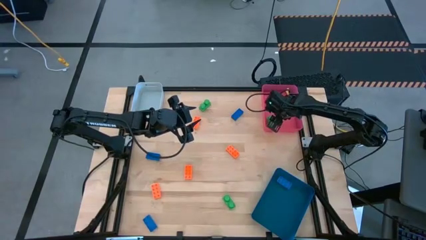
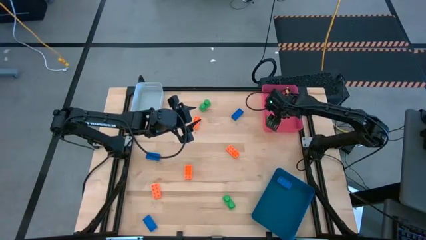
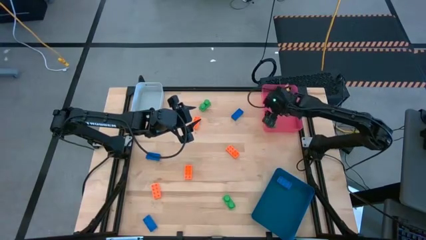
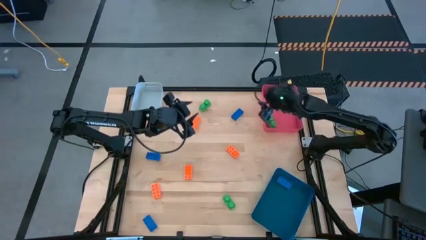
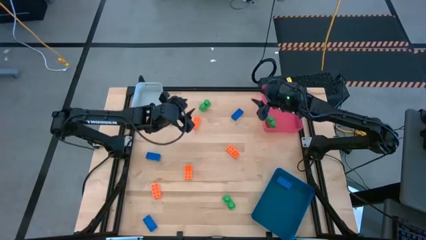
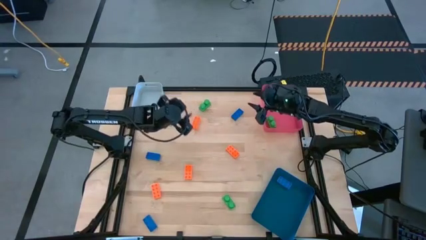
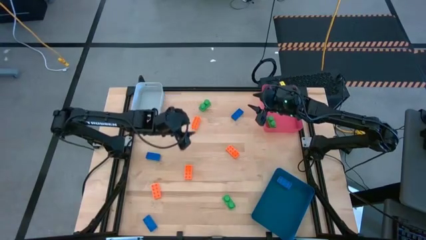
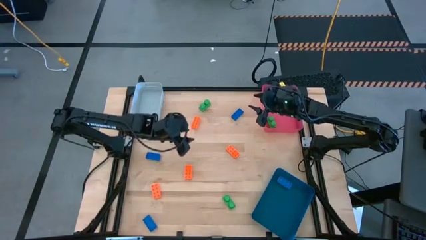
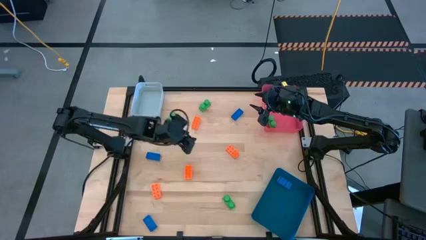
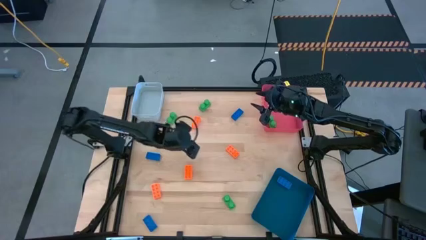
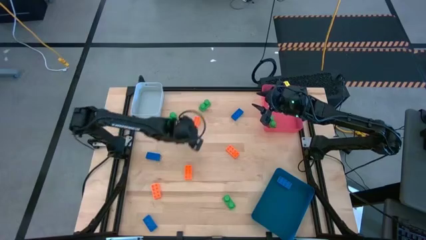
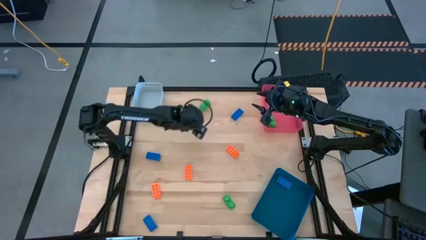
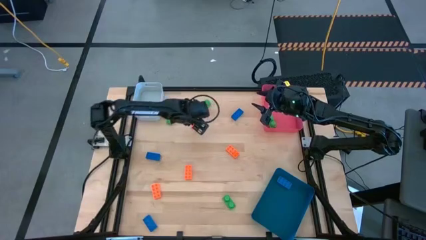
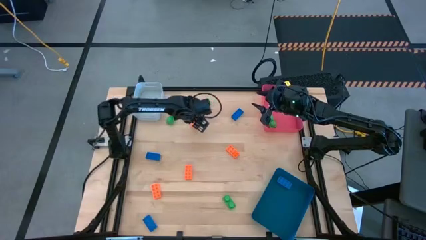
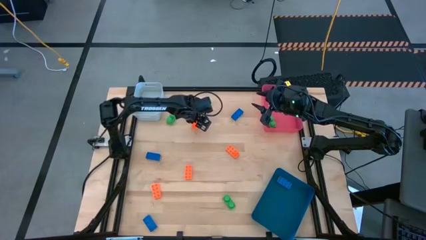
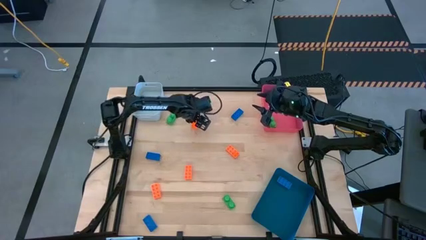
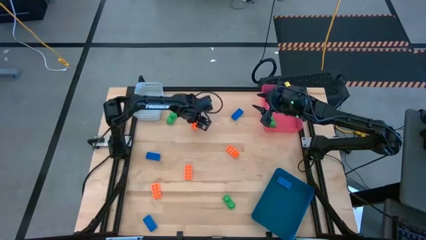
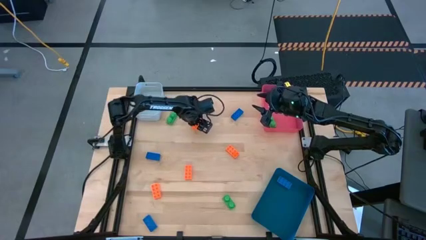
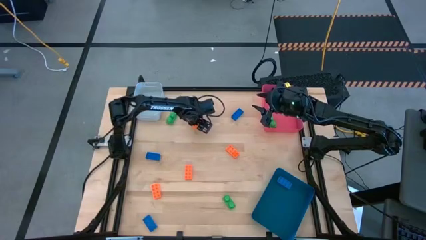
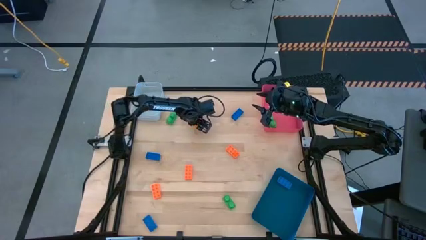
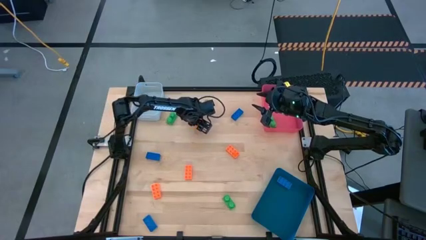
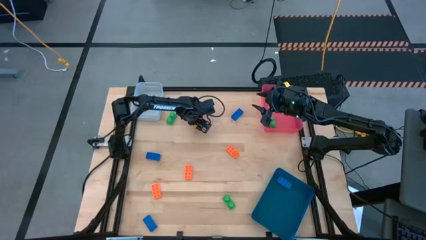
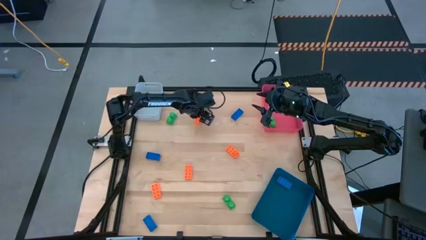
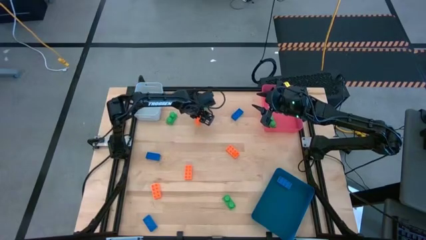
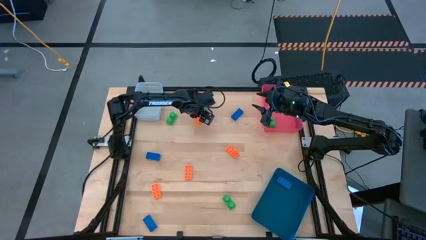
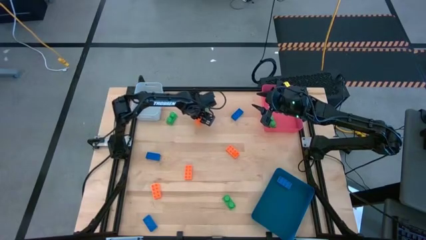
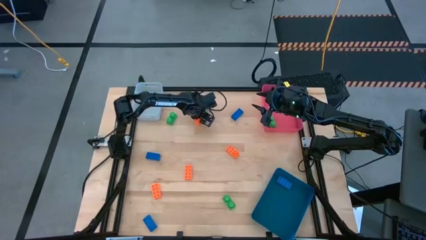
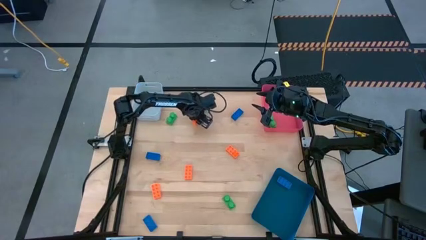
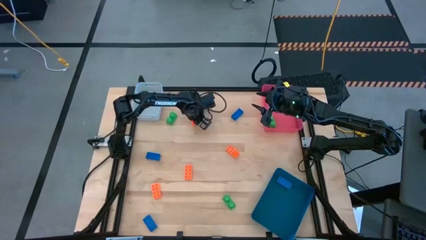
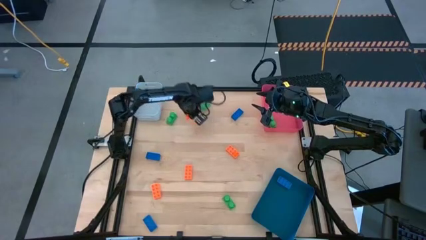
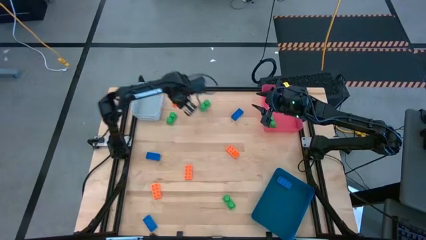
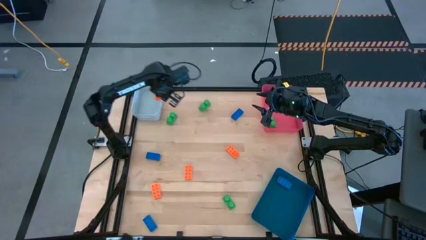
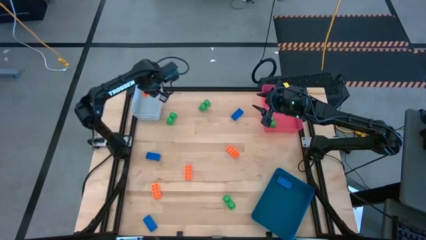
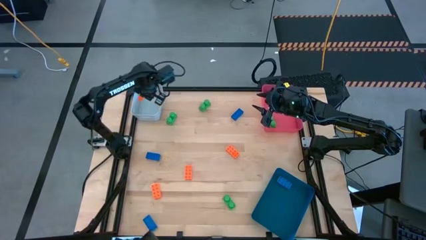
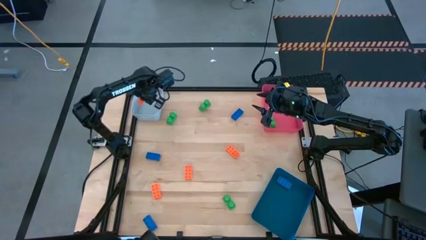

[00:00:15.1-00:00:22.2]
Task: Sort & place blocks by color
Put the orange gamepiece into the gray bin

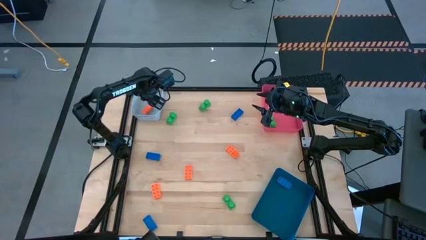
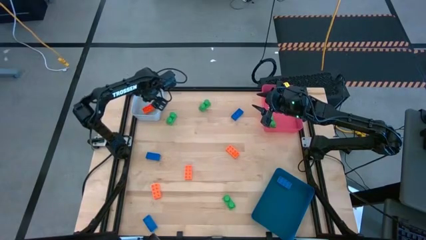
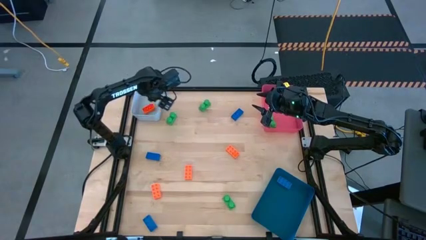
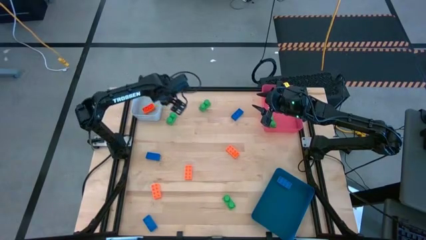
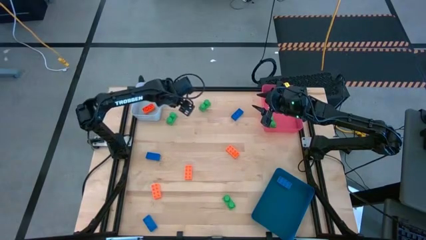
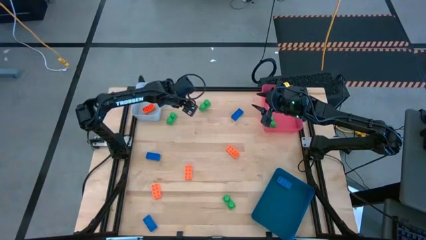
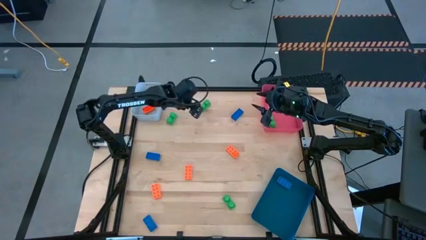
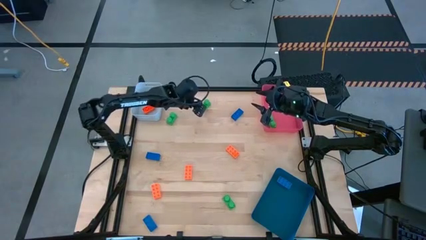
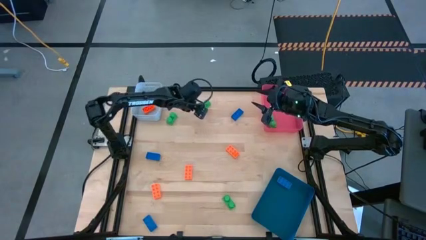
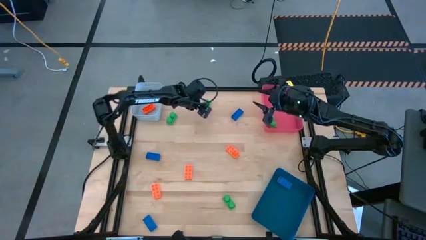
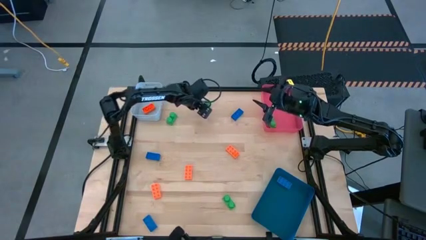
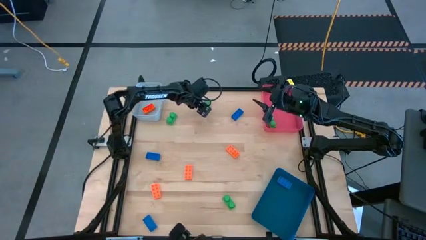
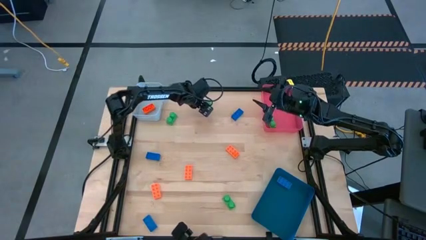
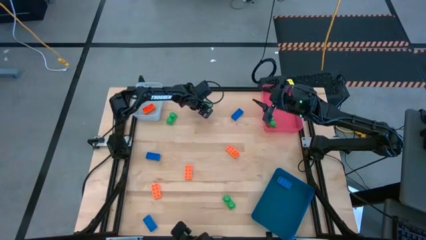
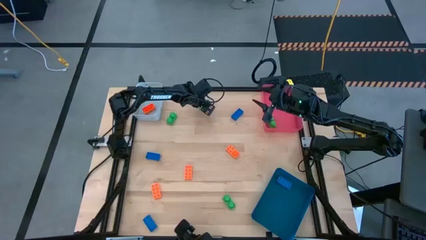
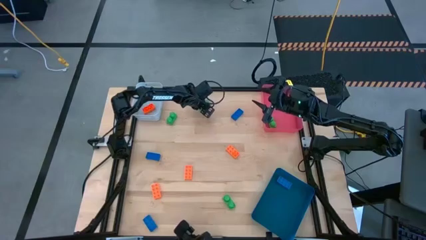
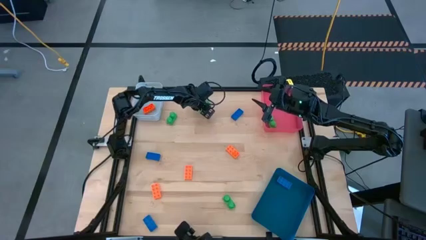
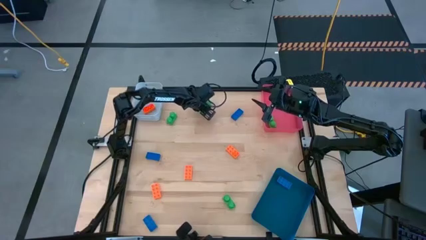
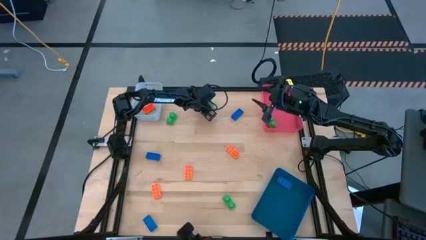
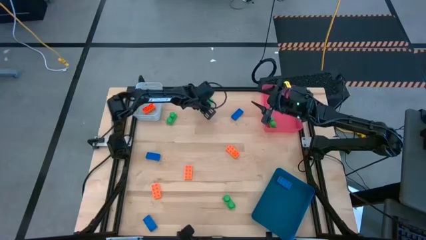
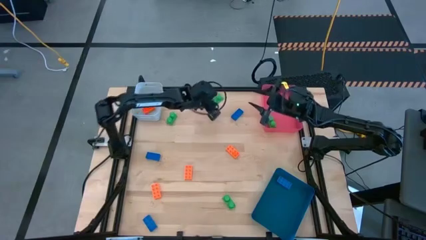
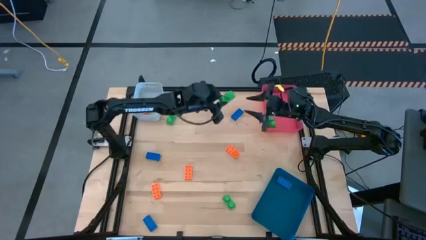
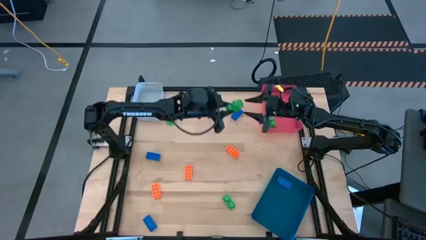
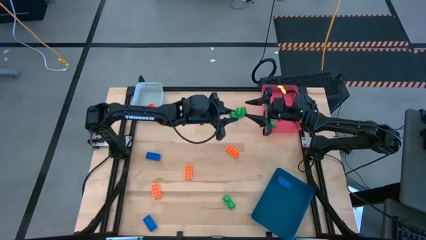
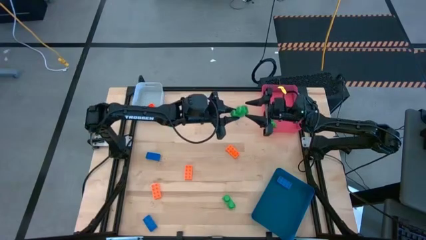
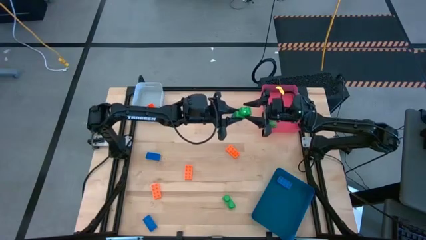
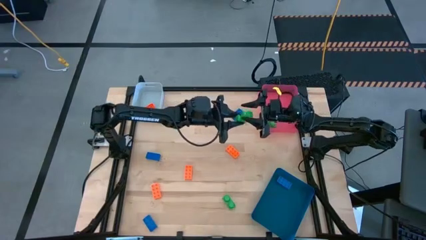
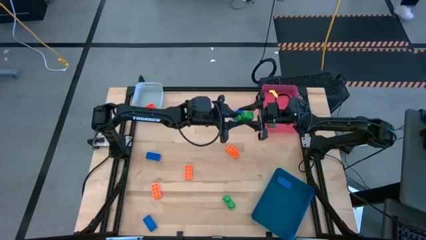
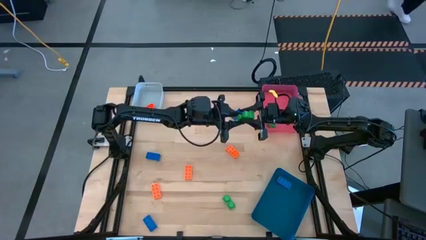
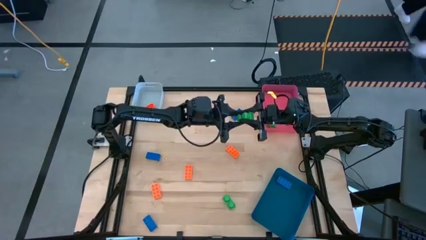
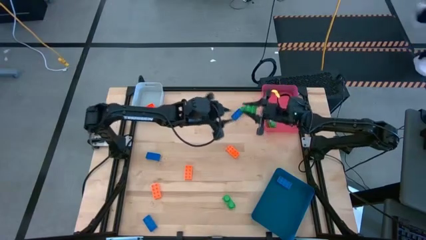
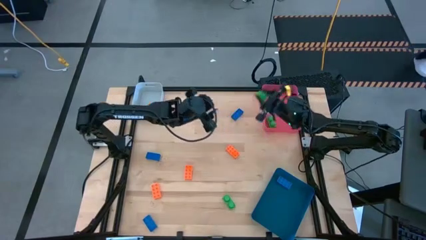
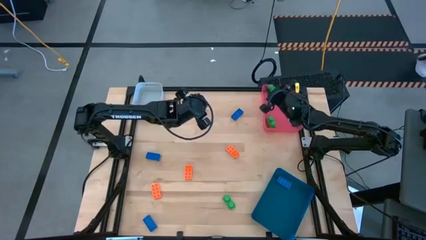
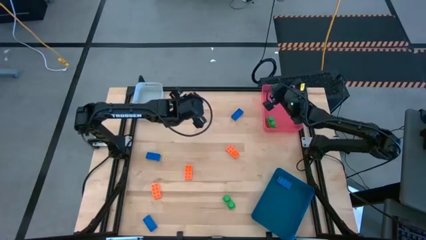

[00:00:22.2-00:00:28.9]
Put the green gamepiece into the pink bin

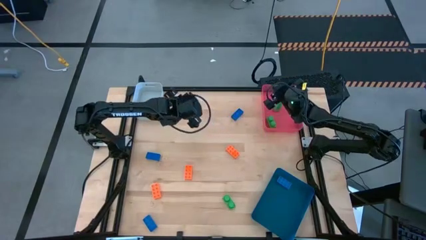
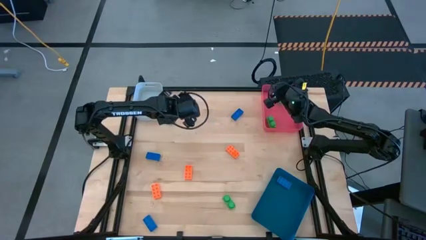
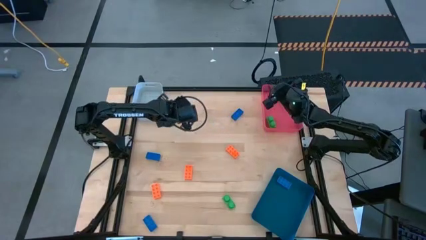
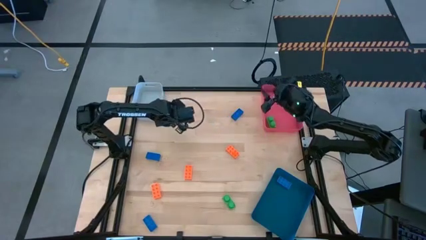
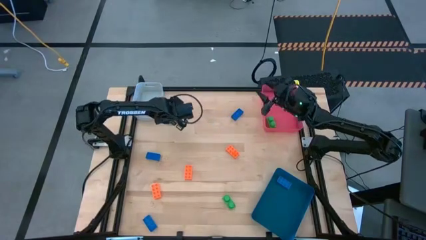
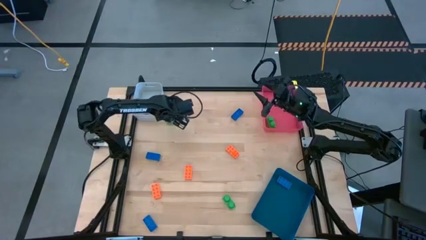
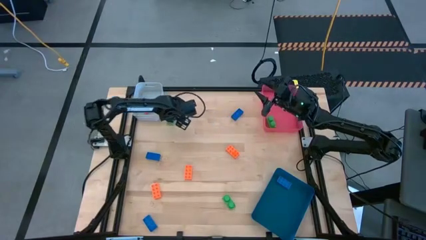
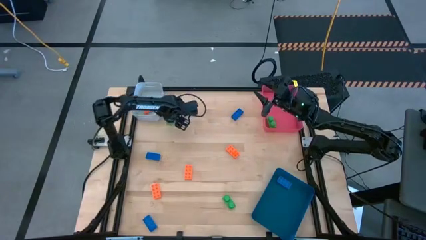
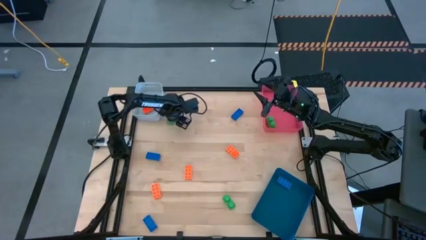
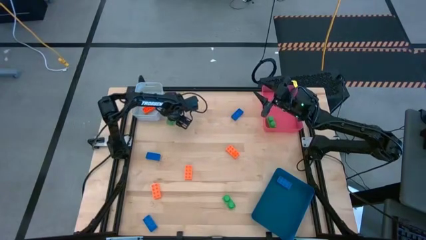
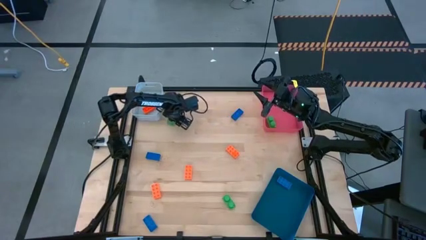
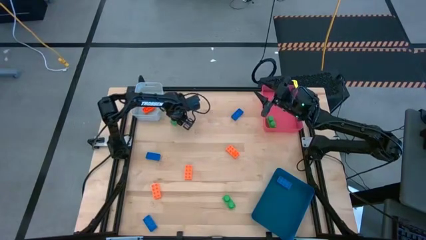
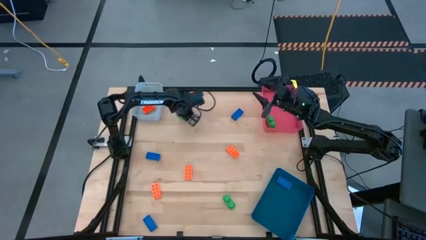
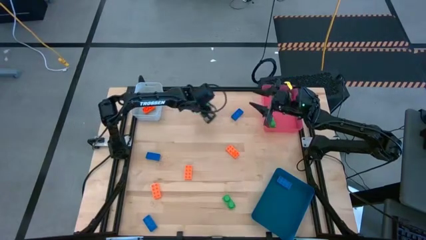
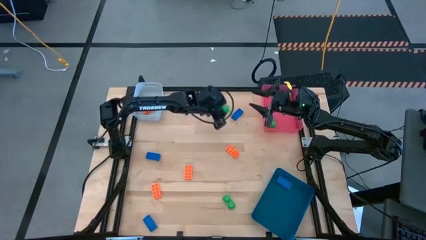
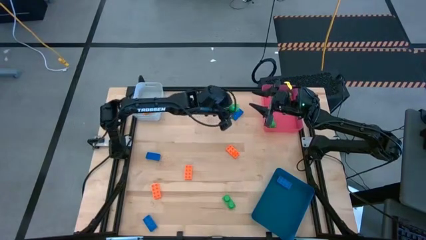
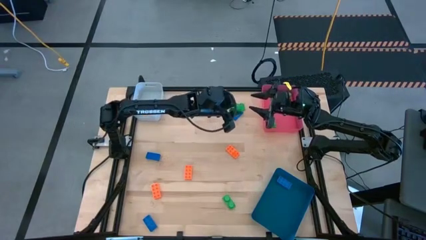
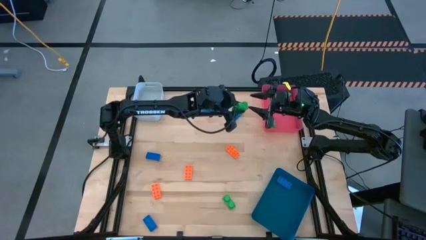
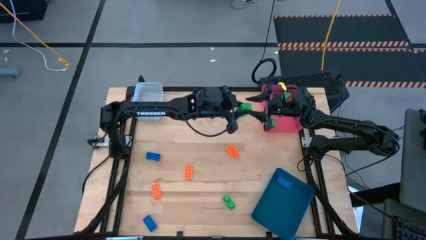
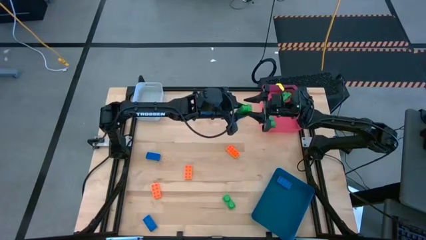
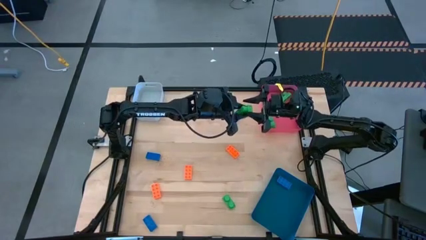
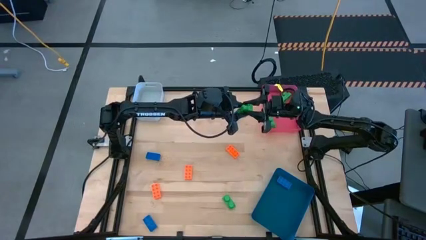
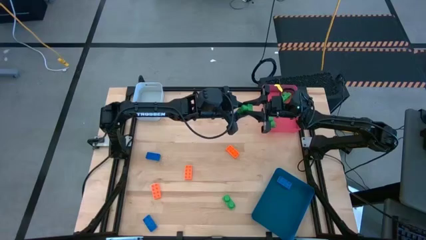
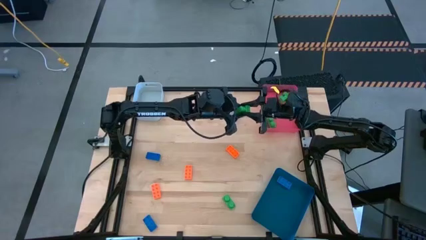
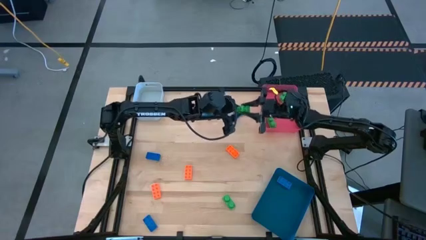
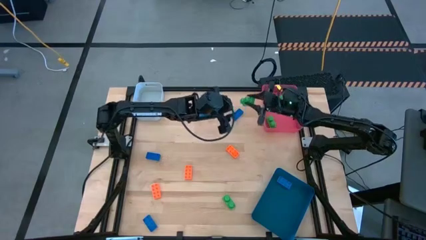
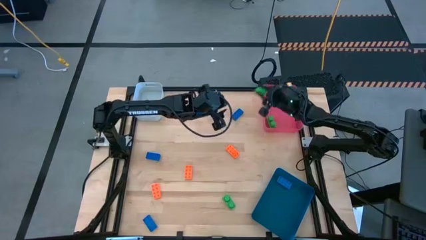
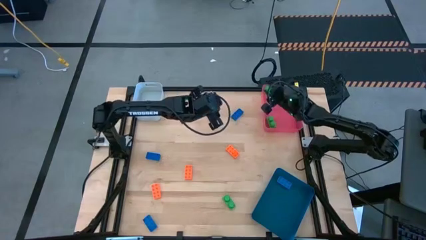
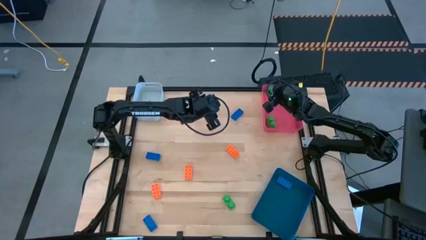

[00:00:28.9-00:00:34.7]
Put the green gamepiece into the pink bin
